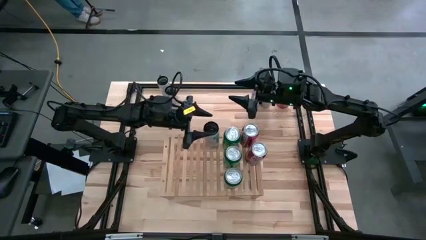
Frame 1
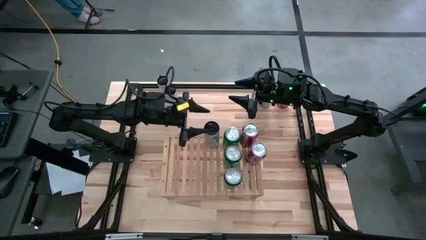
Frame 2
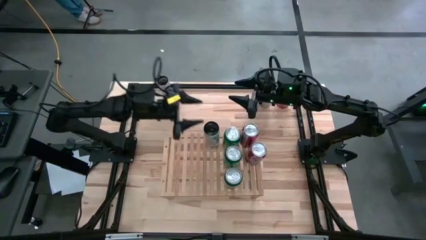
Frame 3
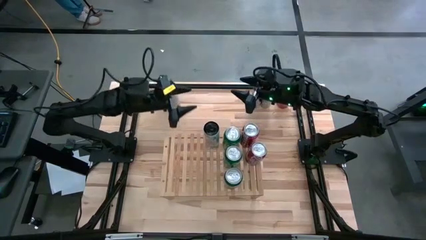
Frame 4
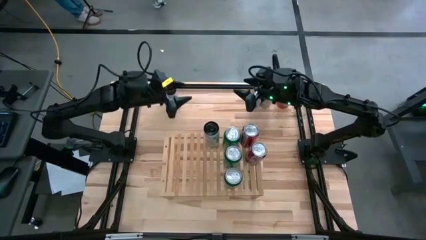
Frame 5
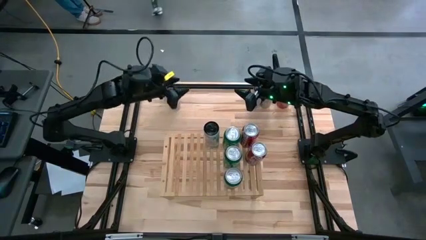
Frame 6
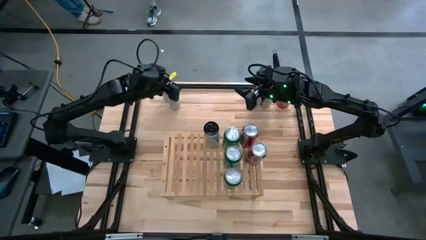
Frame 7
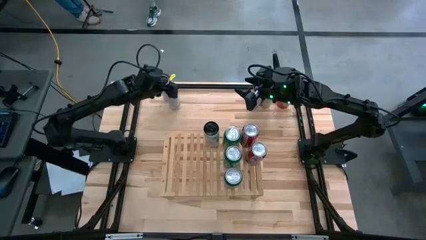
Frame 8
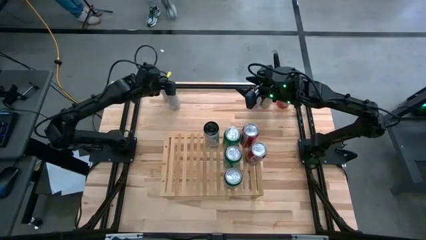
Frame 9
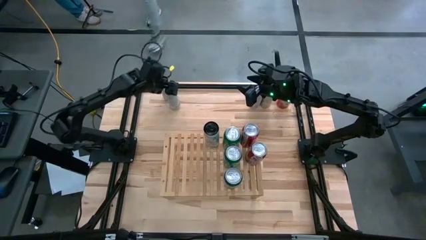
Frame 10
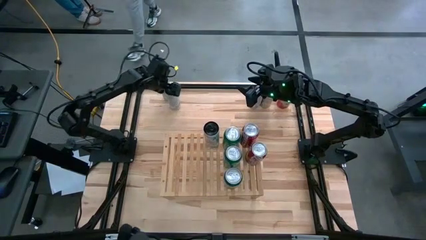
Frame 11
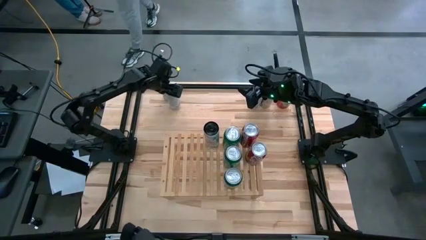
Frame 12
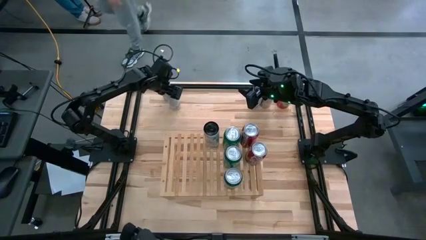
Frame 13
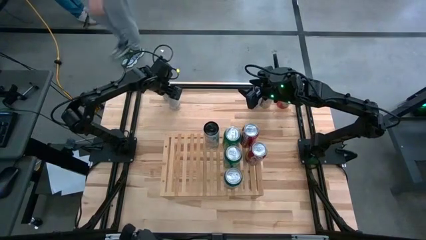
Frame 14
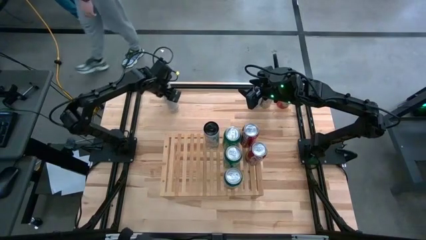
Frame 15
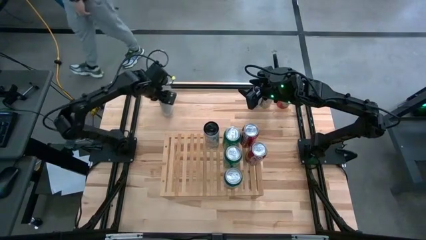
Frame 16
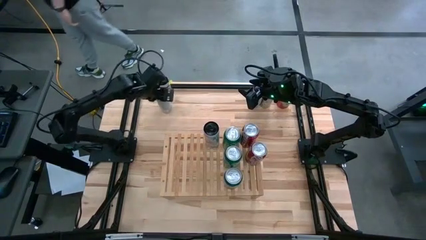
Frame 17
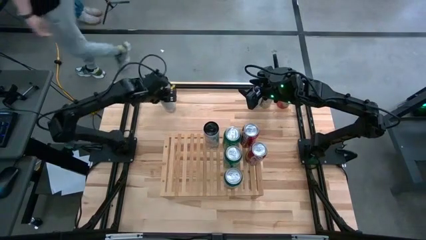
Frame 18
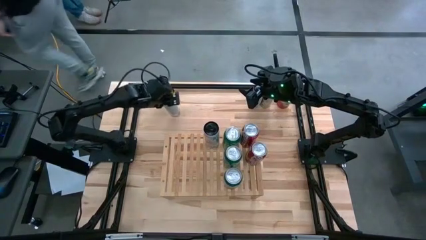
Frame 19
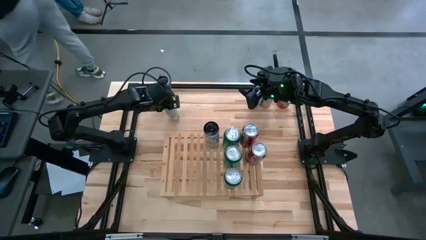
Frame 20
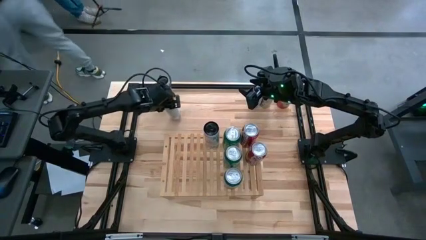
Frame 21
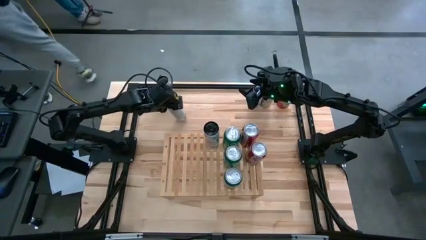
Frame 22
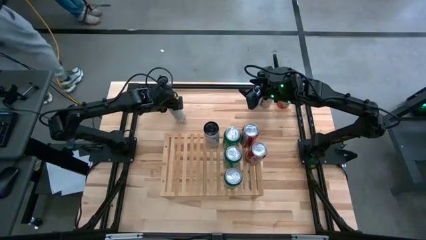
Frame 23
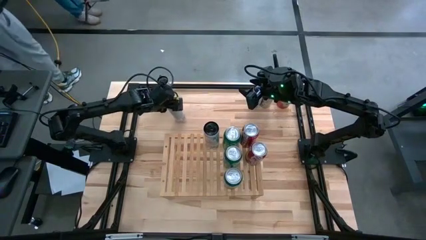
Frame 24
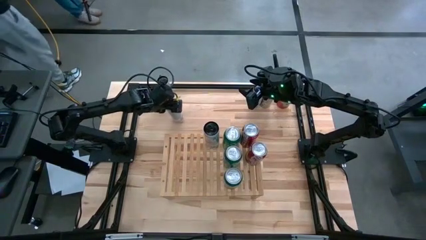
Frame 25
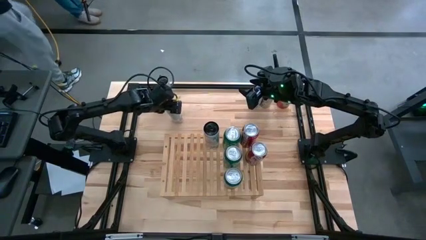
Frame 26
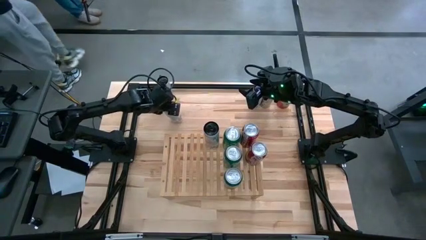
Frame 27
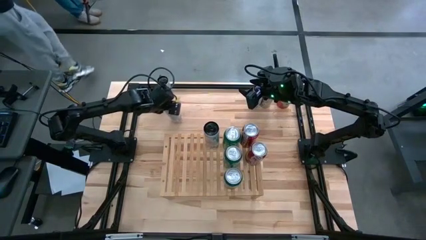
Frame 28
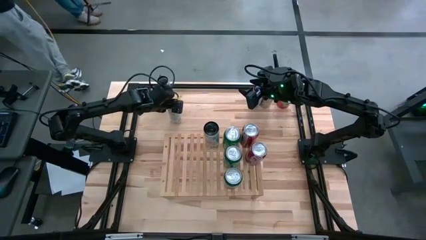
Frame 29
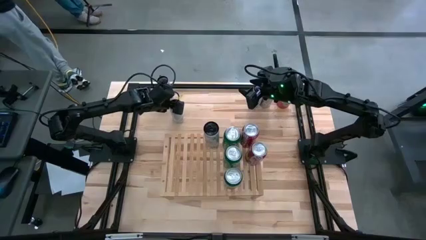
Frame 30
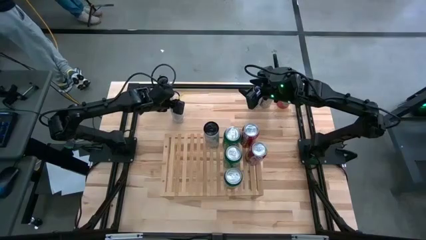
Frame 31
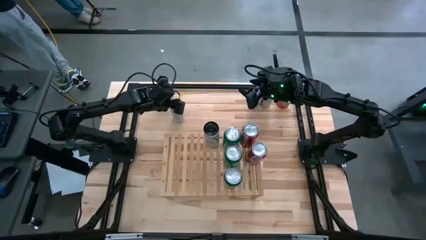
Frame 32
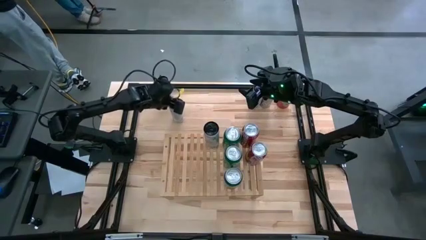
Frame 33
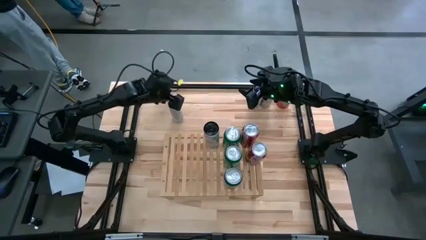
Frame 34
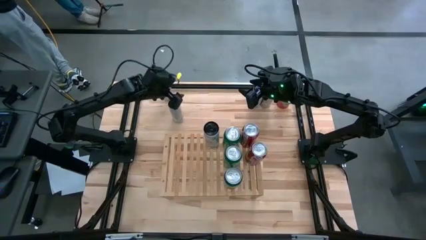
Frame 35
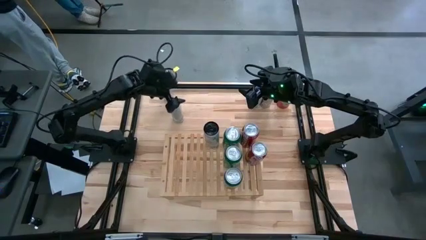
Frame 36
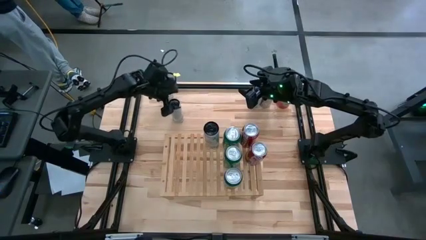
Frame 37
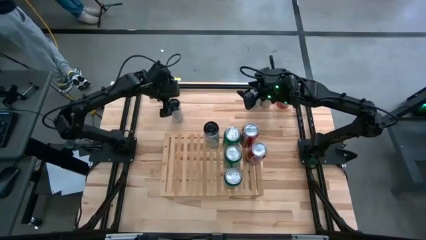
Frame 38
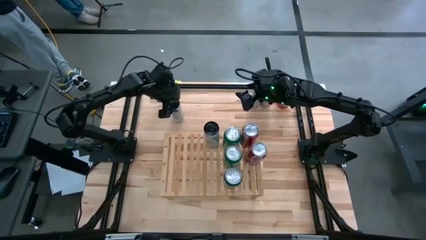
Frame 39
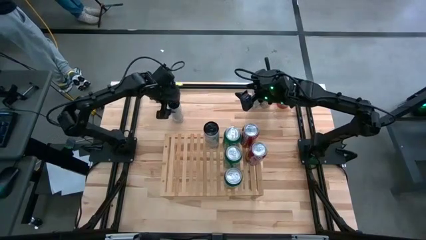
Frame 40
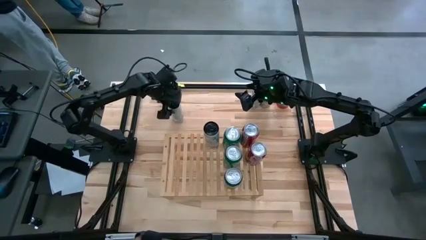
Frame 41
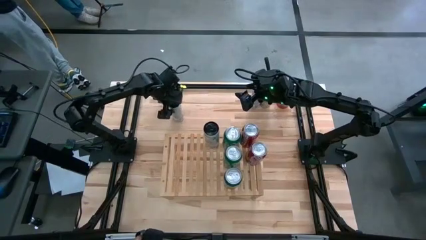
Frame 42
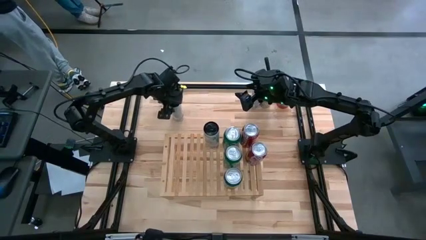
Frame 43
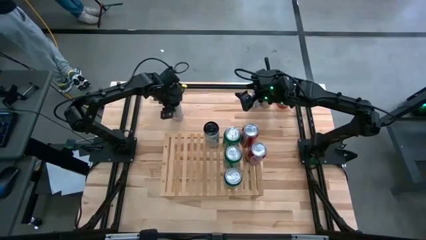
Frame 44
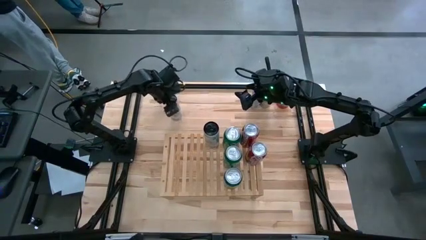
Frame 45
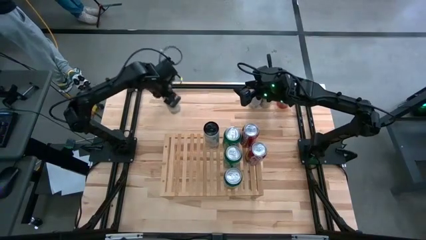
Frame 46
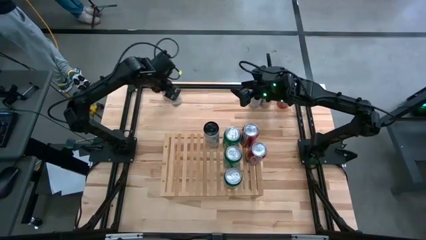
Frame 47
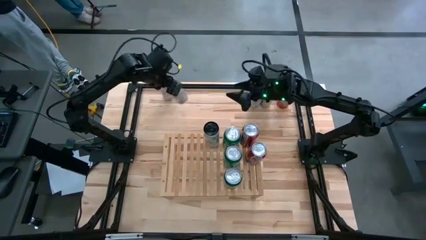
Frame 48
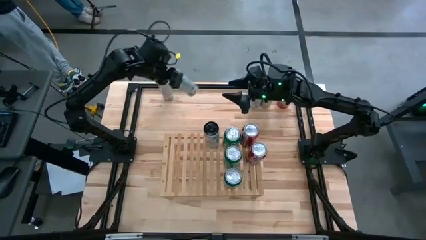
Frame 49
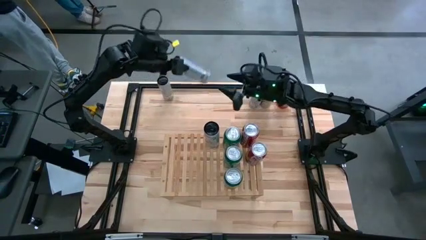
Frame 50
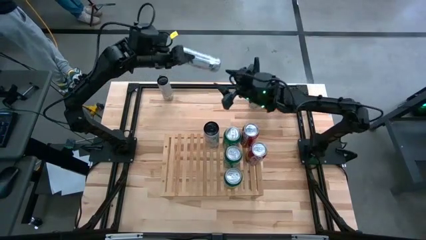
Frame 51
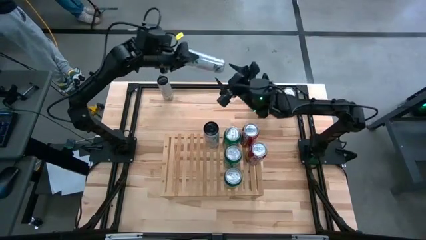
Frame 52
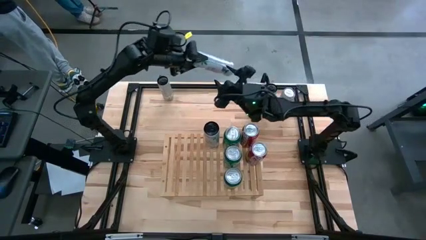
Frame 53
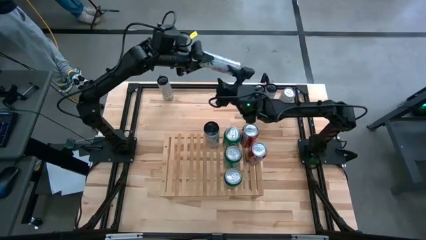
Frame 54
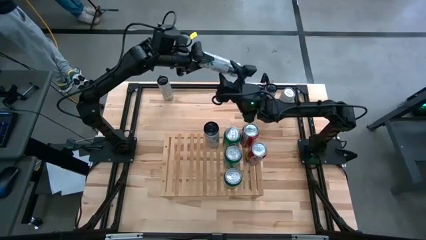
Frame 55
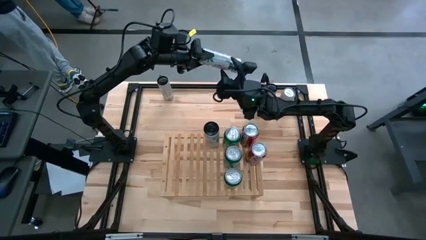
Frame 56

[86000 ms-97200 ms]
Task: Place canned beverage on shelf
Put the left white-pink soda can on the shelf aligned with the other white-pink soda can

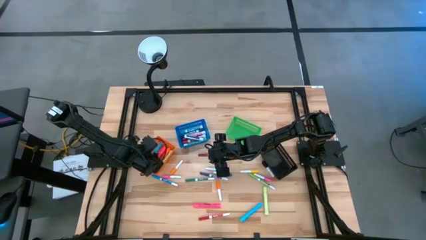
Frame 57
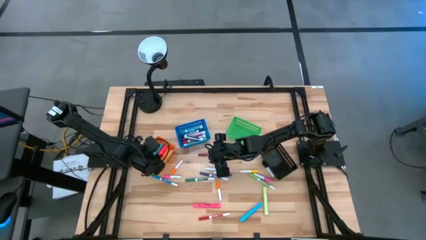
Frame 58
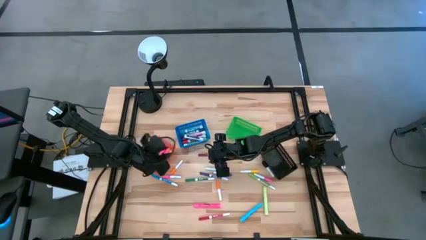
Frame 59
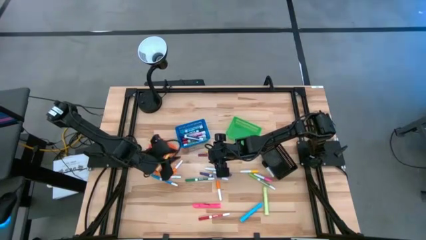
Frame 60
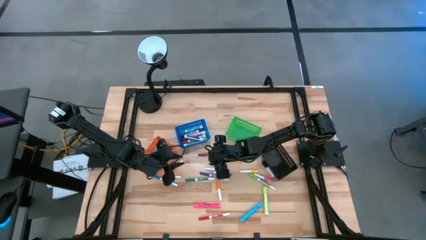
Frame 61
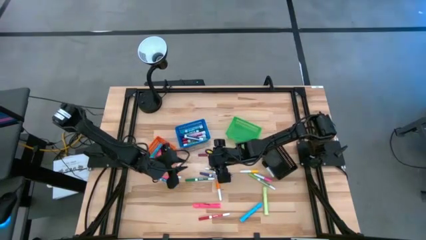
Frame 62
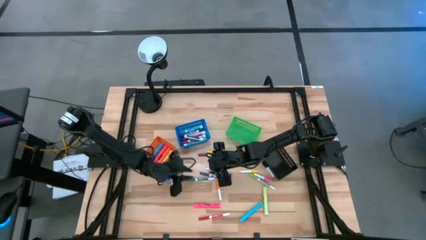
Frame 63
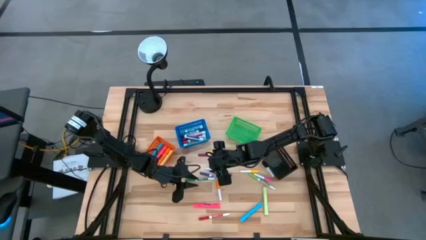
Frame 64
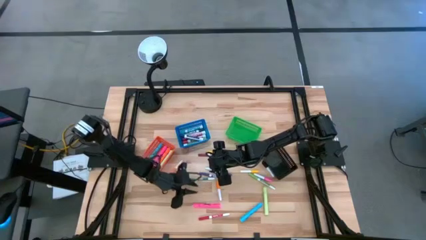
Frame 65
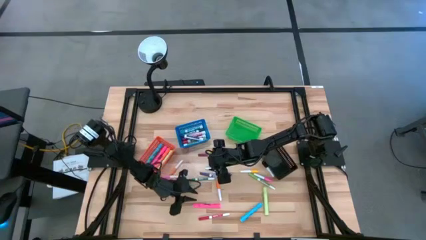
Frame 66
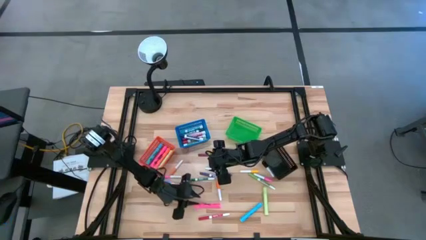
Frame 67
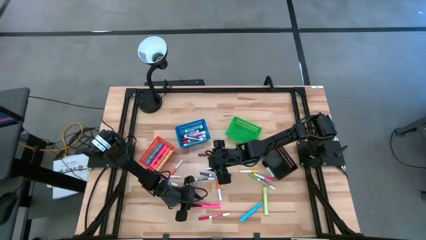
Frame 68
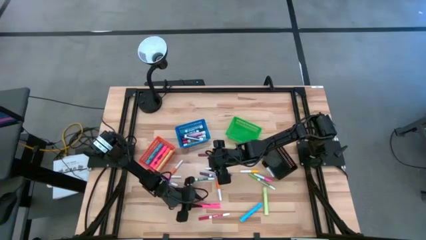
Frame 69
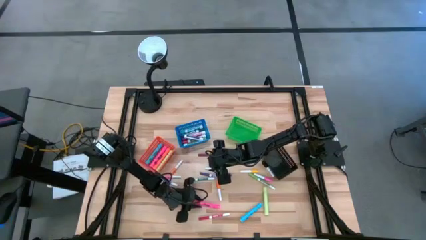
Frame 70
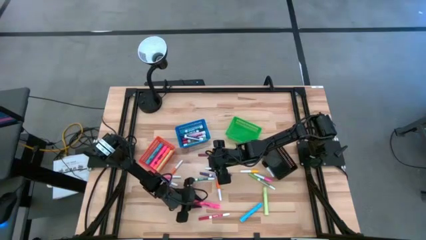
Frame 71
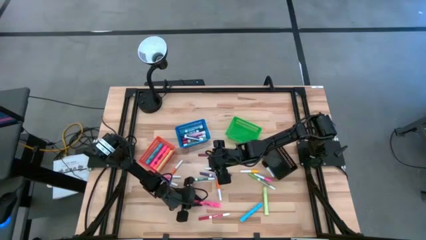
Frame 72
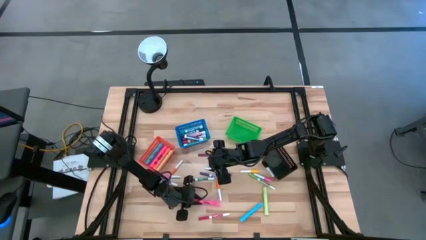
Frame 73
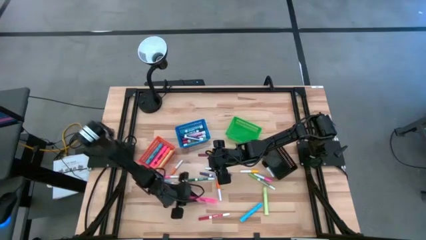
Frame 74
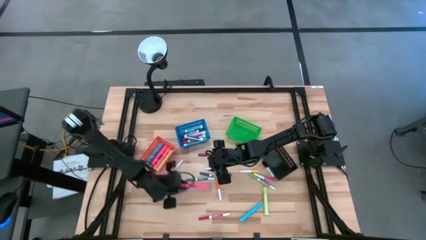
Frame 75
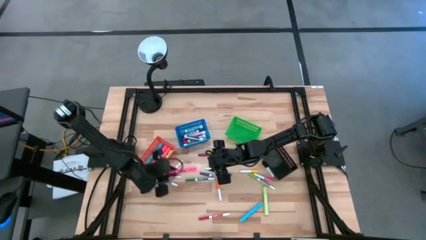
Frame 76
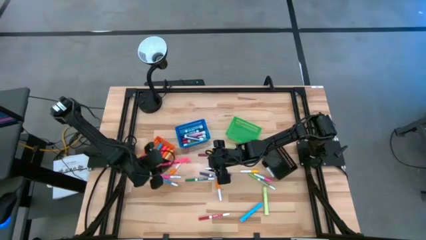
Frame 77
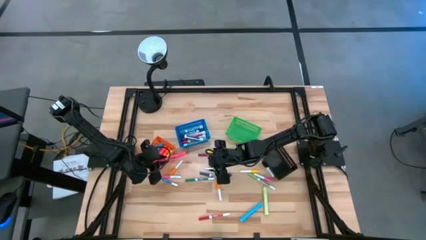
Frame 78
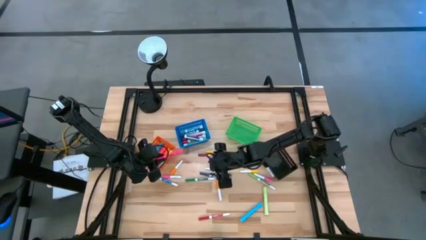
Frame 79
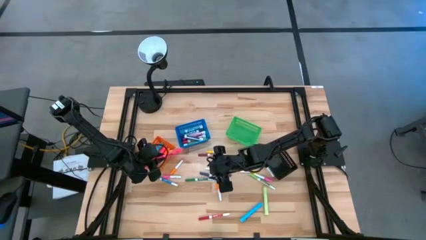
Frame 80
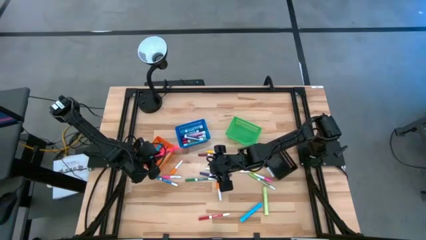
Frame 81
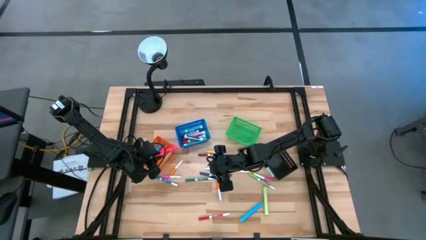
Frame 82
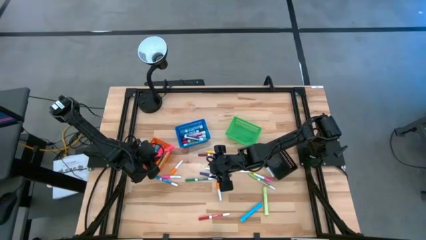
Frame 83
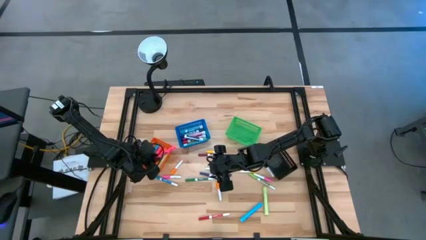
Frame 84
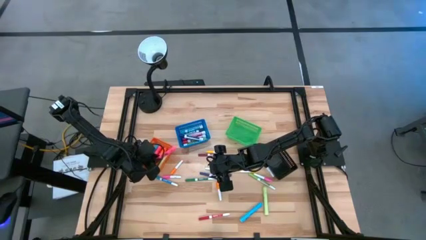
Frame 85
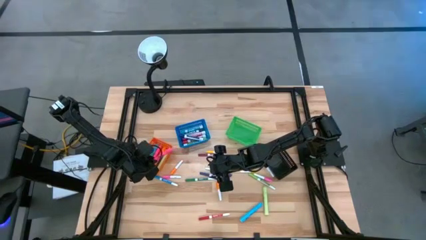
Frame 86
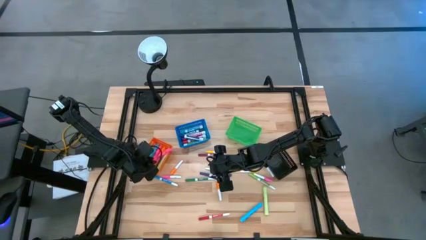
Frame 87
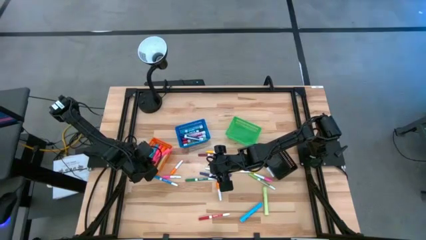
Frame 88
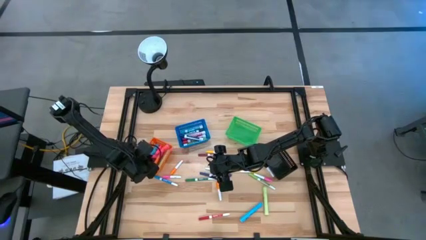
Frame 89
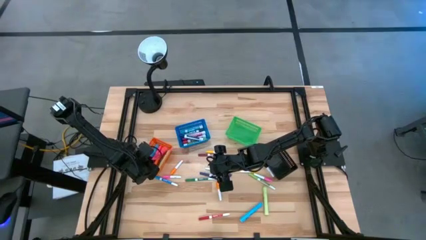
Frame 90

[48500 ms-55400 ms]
Task: Pick & Place Markers
Put the bottom pink highlighter pen into the orange basket
